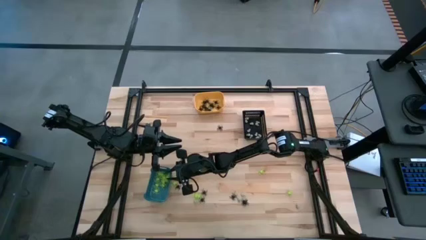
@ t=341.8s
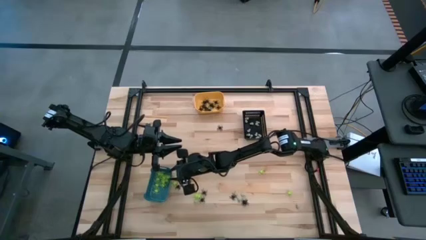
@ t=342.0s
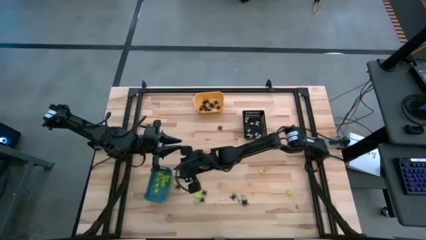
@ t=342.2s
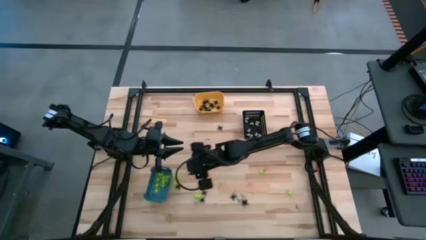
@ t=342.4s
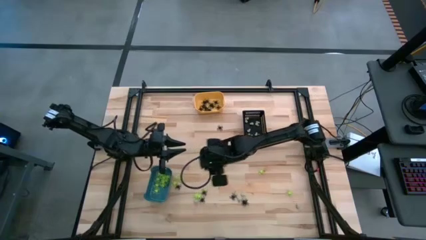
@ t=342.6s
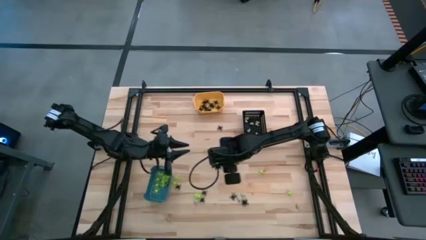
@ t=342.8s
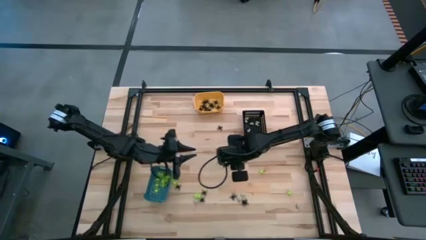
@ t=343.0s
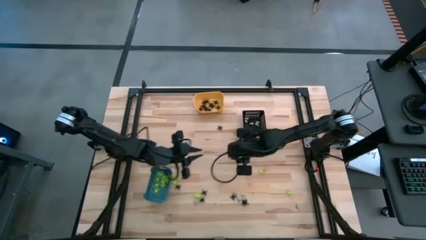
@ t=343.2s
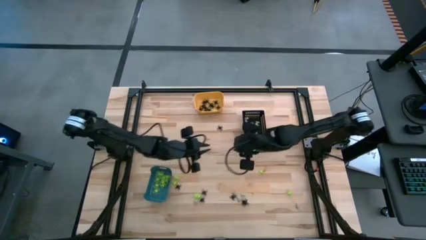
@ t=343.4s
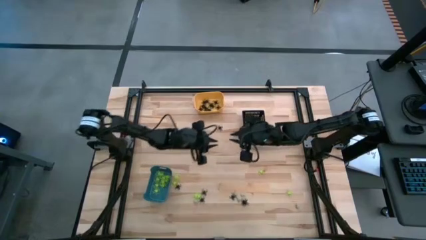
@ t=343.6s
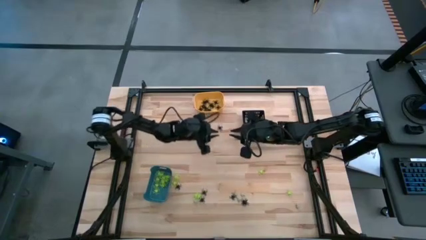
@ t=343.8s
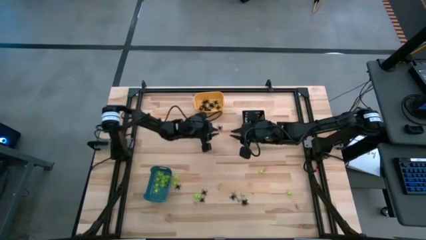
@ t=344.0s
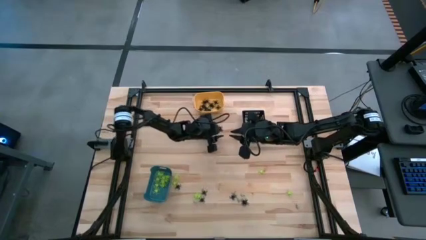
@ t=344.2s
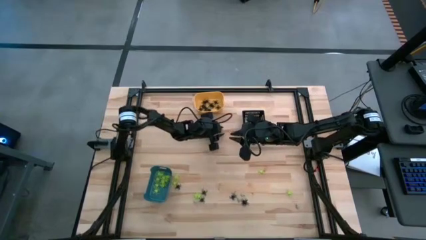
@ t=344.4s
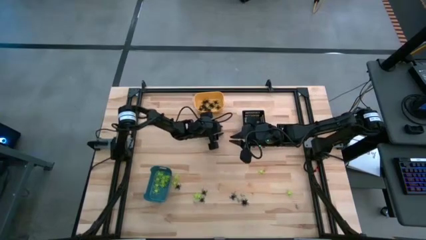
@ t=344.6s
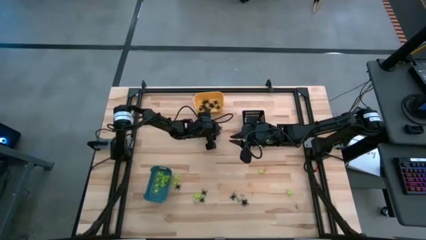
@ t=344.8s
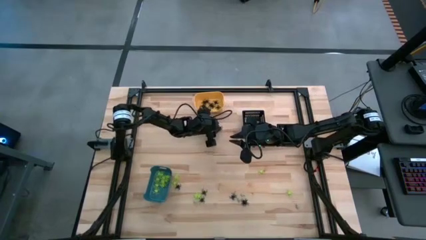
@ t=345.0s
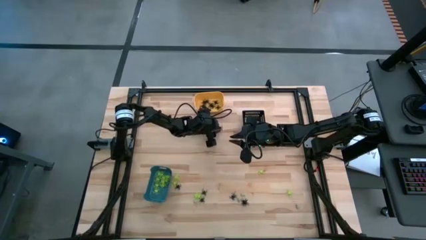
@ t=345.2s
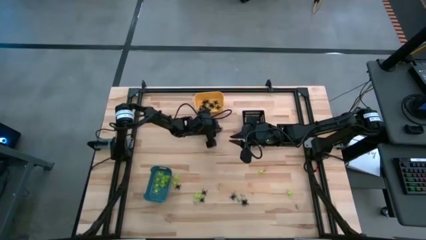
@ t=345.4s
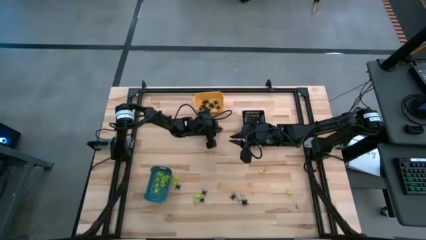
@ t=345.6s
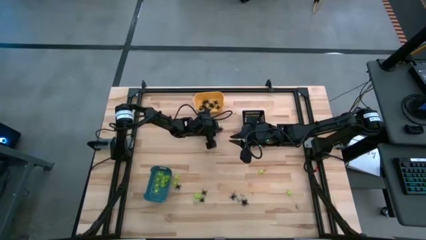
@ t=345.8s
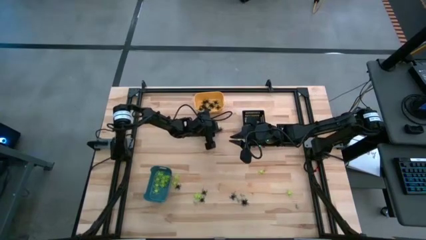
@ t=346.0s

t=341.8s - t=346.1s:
Task: Sort Halloween decoration
Put the black spider toy into the yellow bin

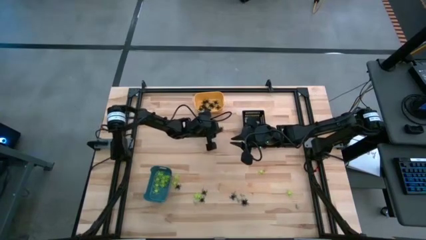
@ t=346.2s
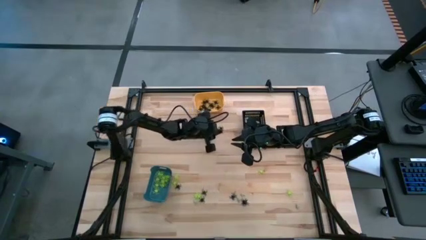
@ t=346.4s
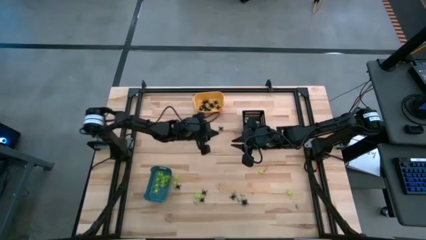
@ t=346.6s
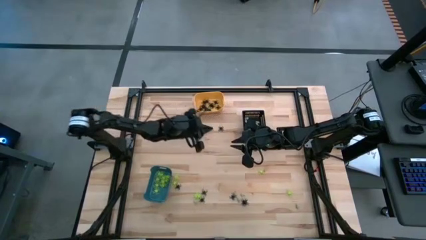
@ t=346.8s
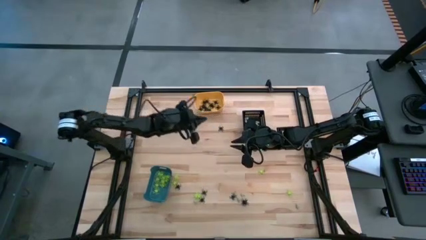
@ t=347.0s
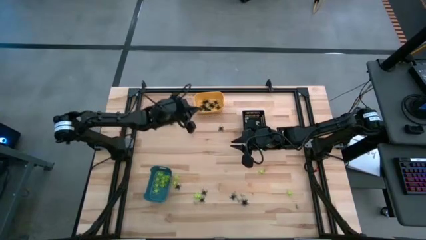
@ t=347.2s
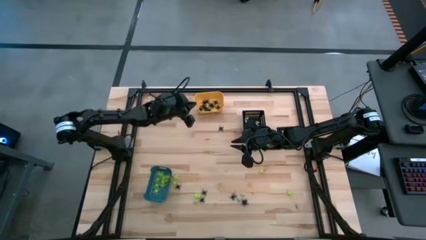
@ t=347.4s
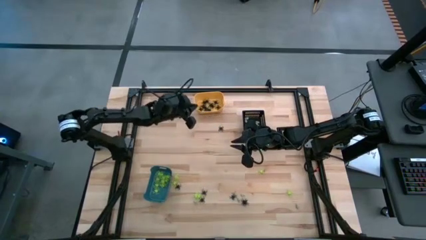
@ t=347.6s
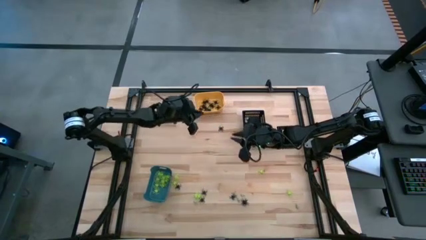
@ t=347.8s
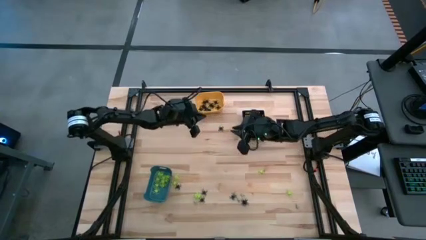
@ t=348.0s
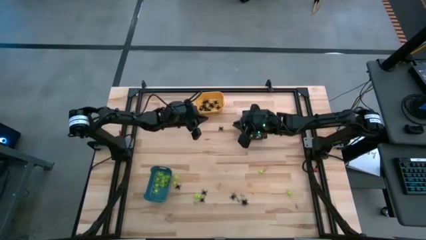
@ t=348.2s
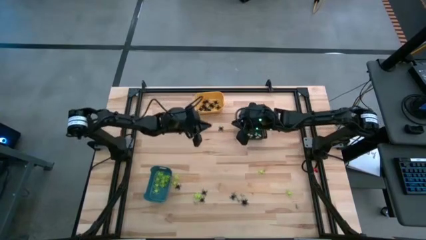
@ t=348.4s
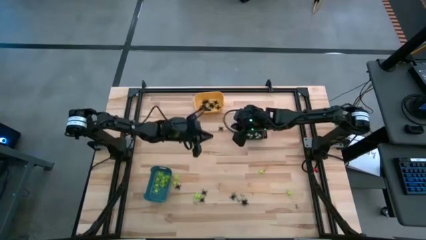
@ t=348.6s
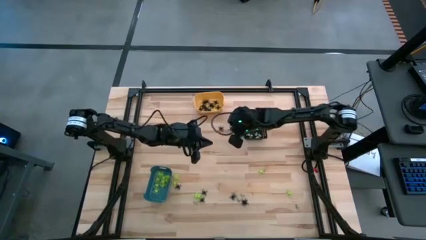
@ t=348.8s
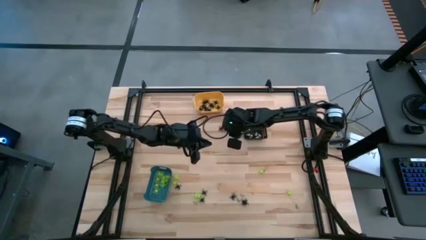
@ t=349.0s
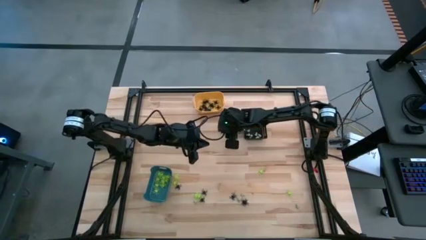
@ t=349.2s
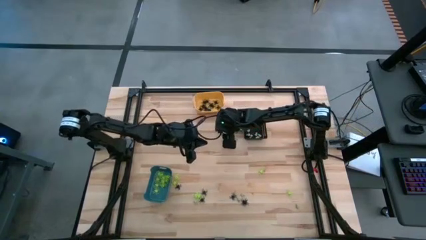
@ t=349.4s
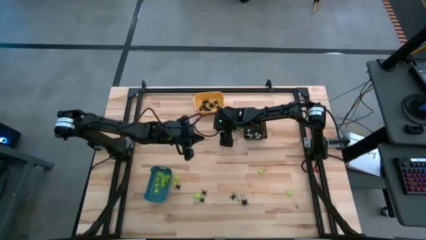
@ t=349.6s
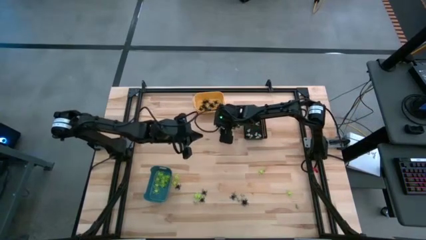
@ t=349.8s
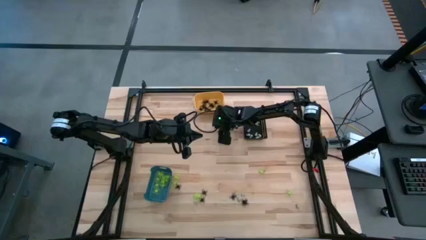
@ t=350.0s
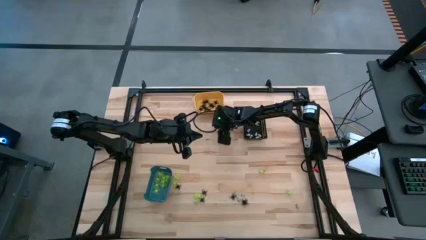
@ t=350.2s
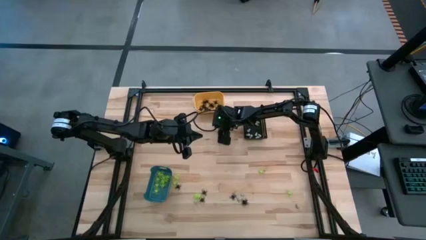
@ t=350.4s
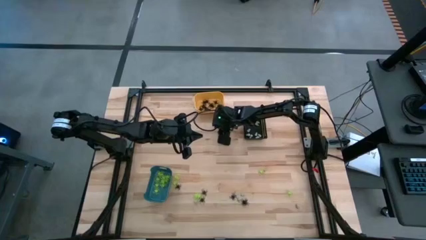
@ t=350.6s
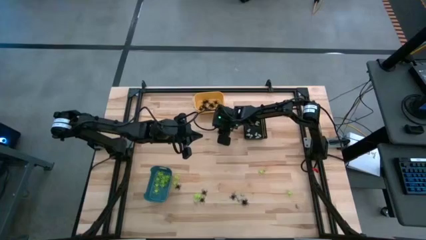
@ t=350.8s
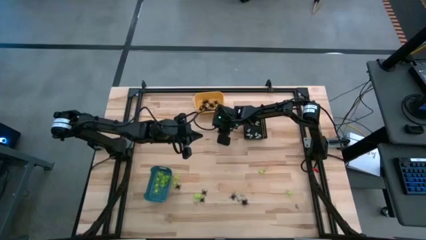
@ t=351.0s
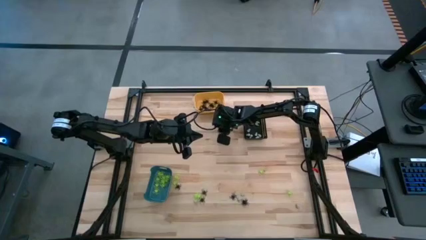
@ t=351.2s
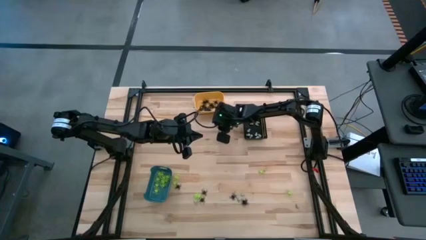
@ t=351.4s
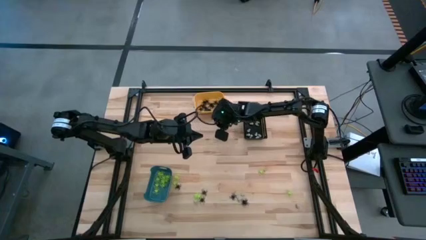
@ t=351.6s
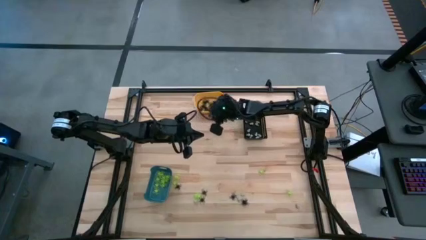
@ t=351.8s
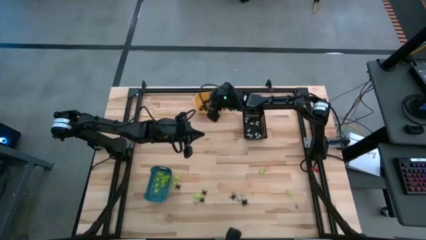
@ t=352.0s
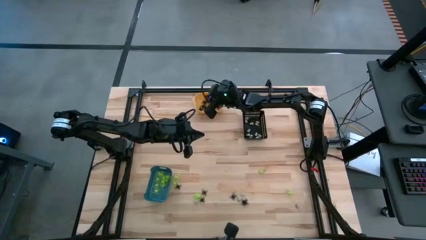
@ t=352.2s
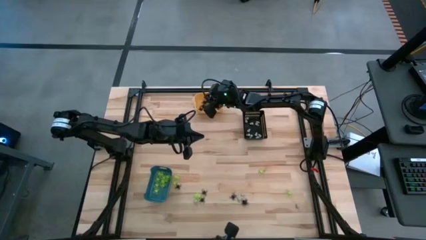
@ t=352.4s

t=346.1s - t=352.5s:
Put the black spider toy into the yellow bin

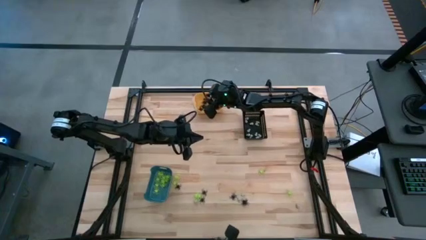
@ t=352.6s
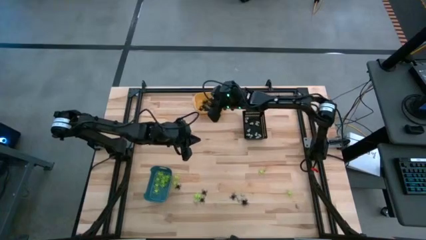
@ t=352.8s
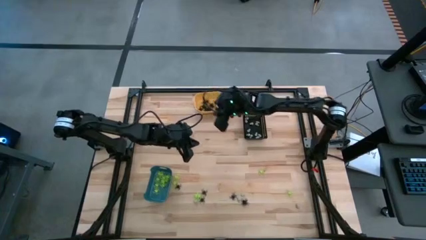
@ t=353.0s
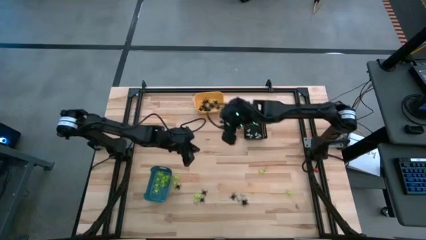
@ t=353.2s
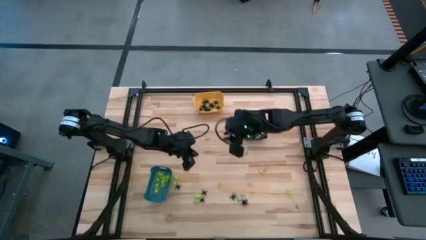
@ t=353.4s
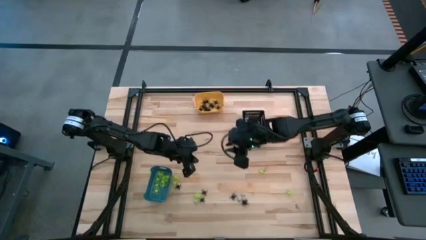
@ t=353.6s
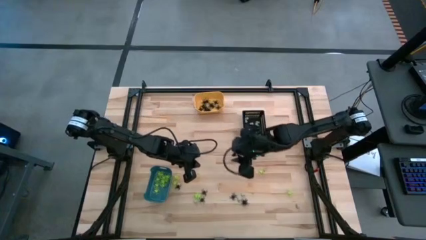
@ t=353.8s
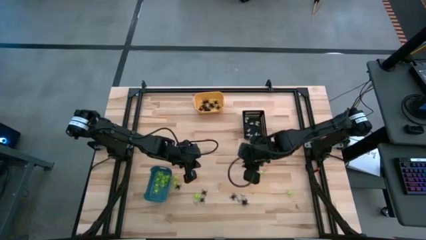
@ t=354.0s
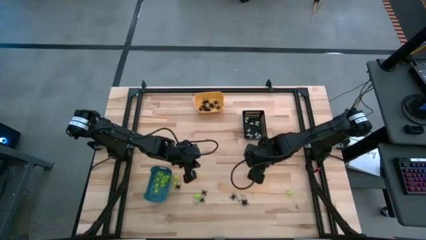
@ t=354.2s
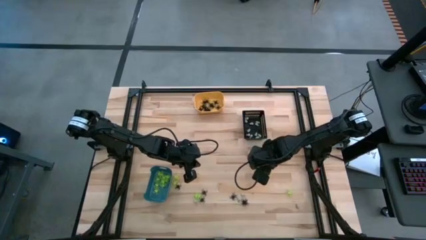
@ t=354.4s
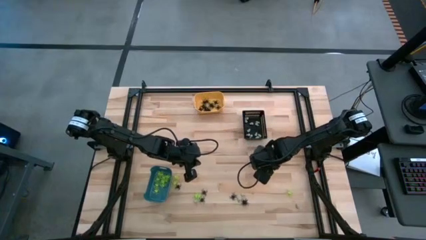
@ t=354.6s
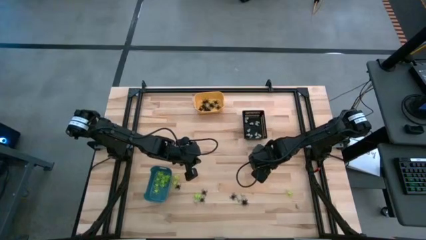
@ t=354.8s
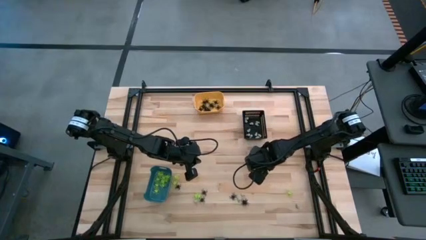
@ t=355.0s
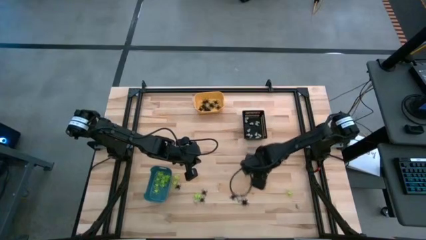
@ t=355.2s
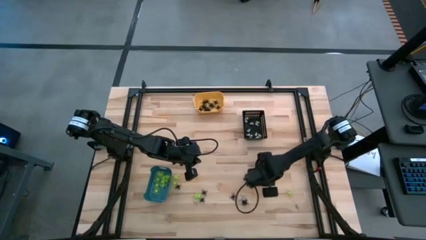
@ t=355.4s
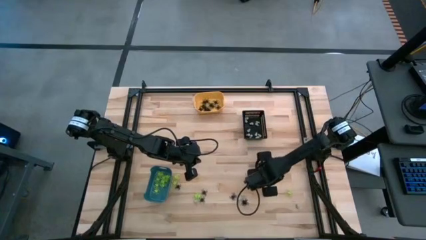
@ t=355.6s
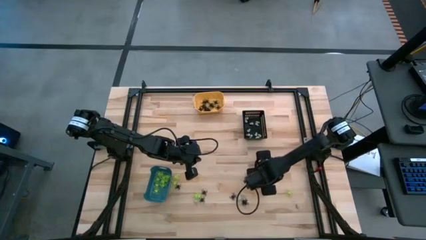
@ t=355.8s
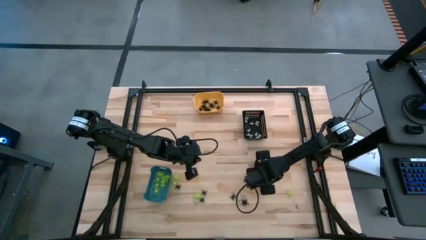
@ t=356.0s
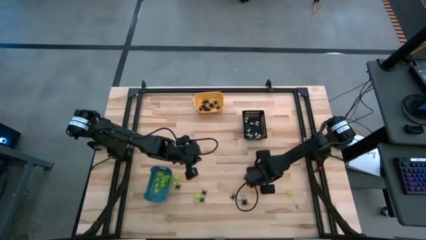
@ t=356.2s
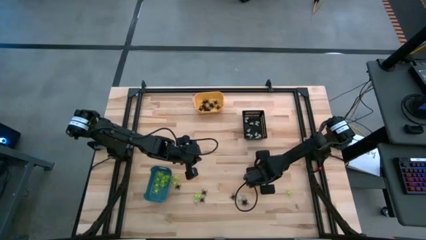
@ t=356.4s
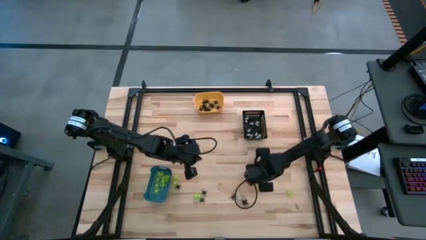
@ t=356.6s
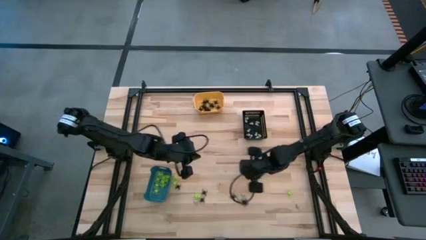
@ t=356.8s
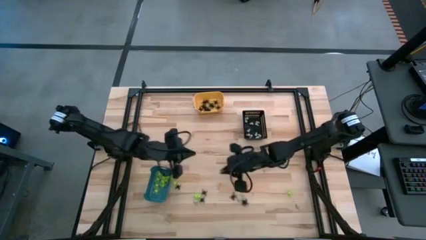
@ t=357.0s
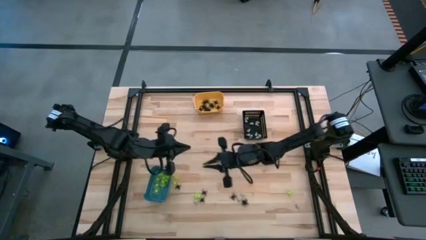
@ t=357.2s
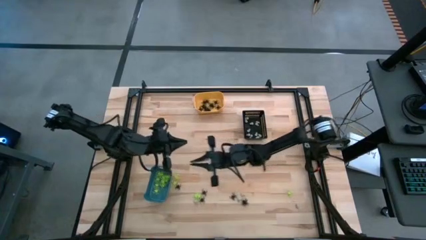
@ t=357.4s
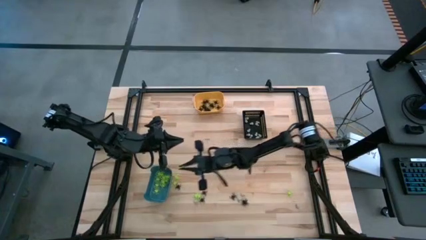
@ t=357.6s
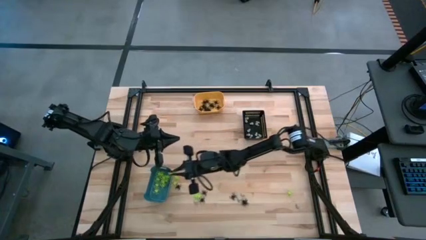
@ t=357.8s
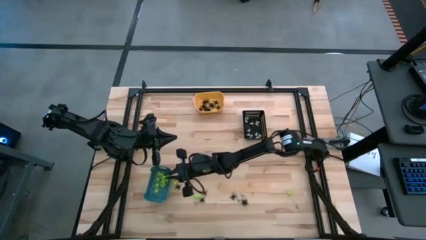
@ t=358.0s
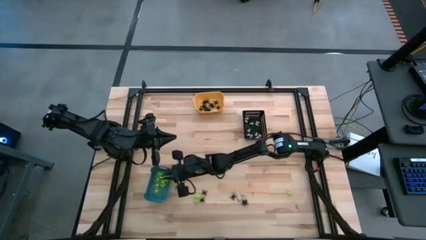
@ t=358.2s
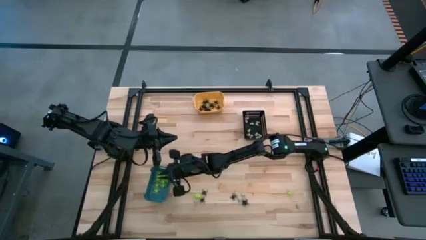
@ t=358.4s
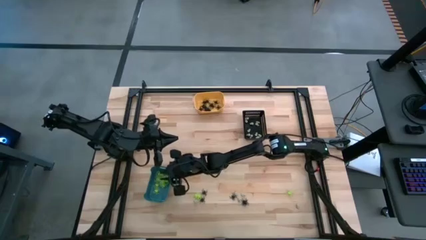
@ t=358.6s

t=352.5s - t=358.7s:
Put the green spider toy into the blue bin
